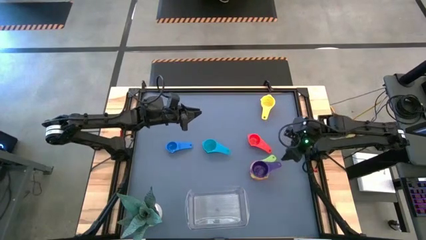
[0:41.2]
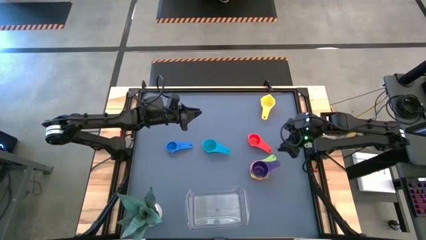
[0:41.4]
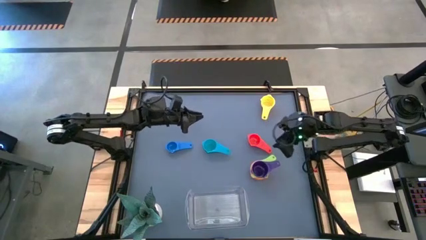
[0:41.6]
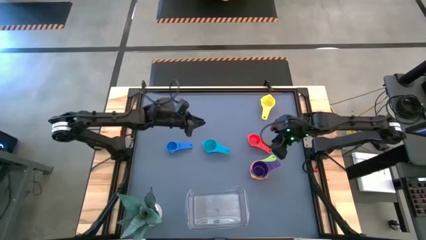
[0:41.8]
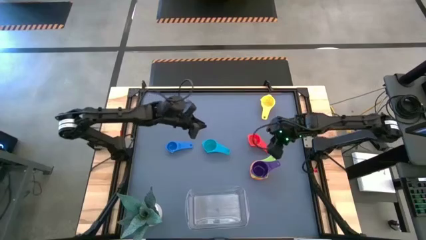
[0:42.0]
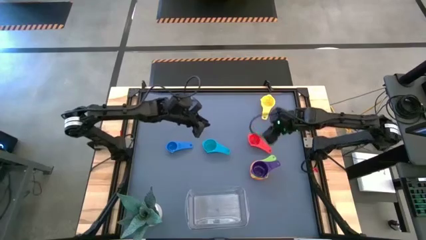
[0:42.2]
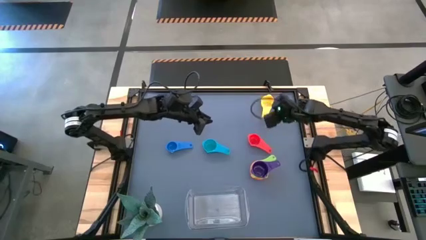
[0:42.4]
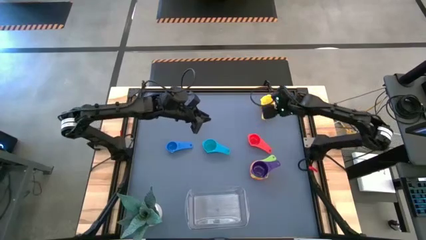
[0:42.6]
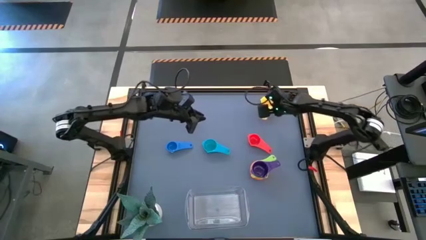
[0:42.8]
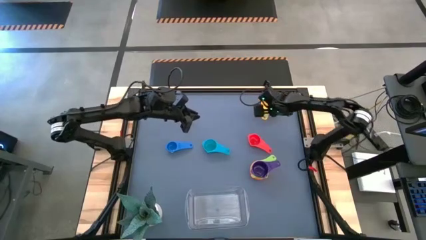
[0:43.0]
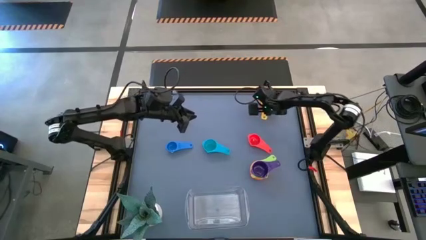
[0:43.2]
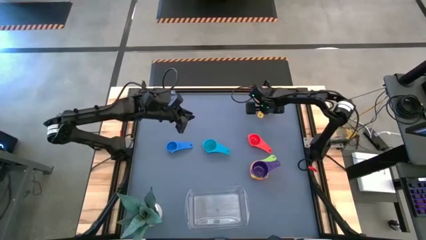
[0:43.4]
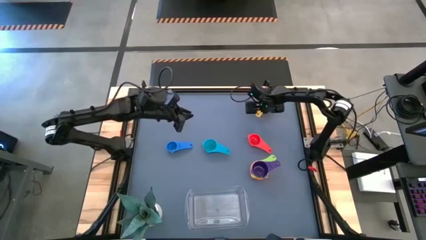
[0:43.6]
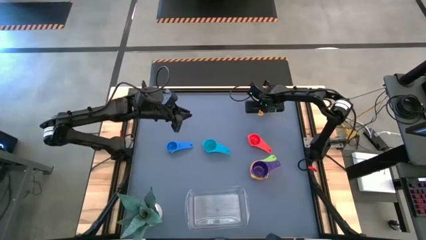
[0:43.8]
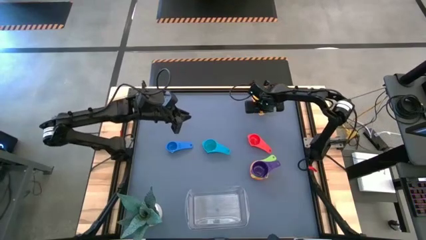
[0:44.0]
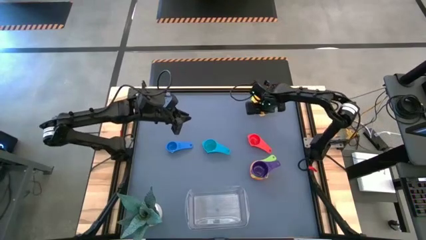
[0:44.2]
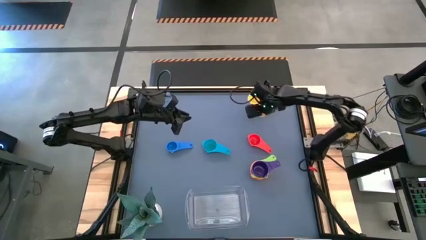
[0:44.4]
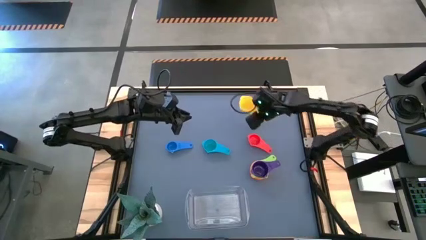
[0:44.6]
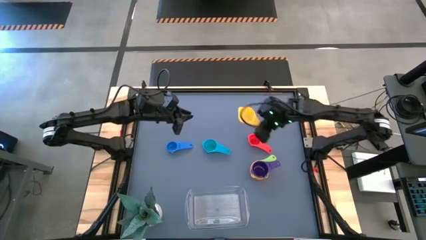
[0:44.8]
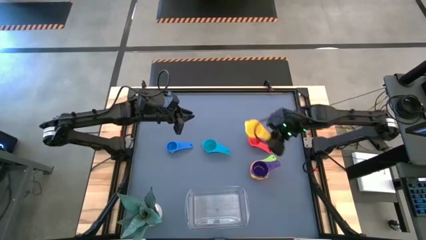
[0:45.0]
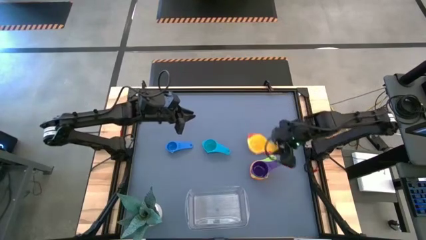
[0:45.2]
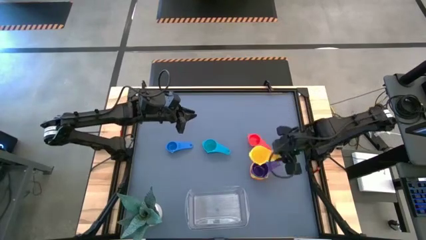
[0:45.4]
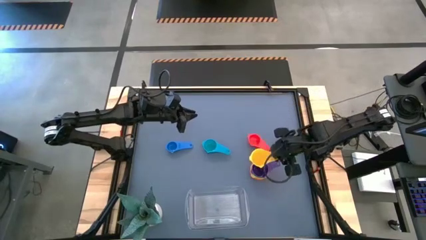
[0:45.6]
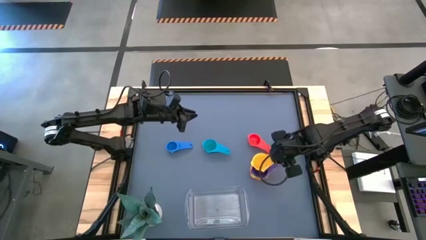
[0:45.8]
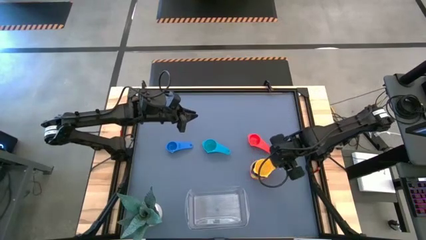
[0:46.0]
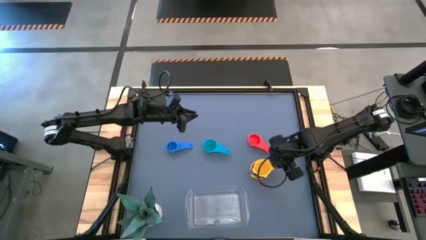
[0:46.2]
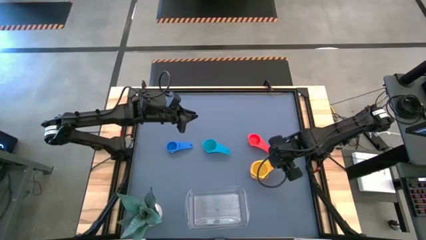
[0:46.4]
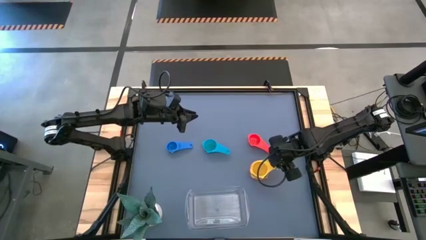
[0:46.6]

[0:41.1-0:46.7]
Task: Nest measuring cups in basket
Stack the yellow measuring cup on top of the purple measuring cup

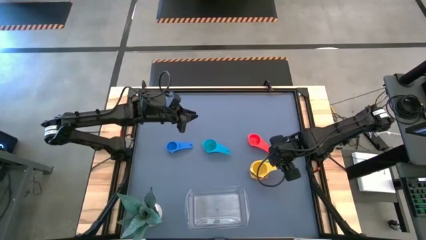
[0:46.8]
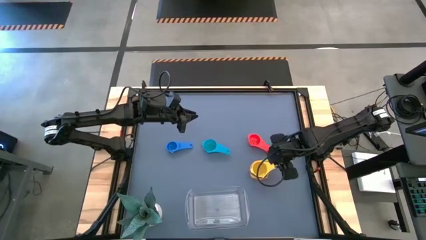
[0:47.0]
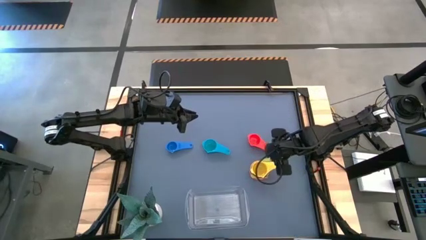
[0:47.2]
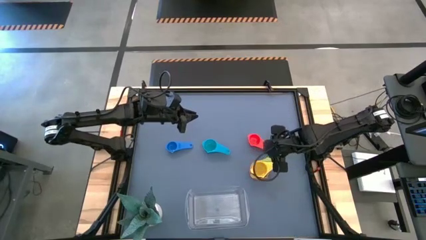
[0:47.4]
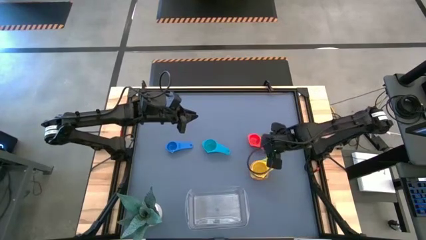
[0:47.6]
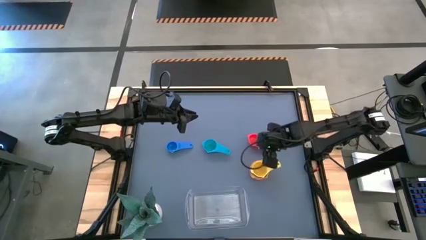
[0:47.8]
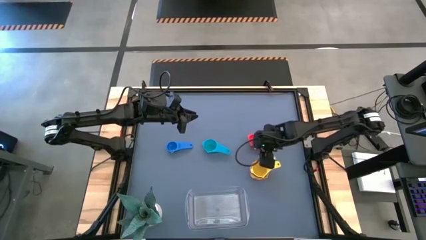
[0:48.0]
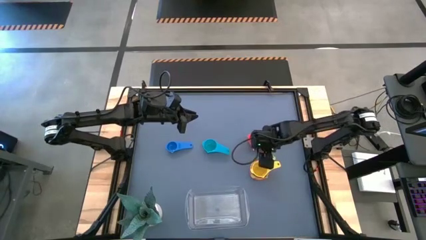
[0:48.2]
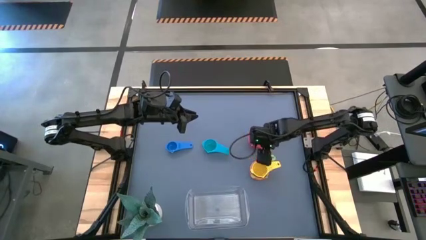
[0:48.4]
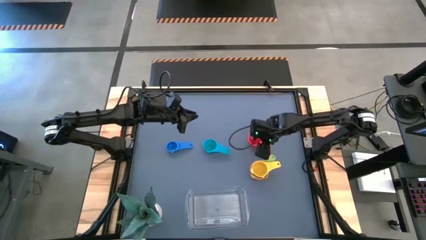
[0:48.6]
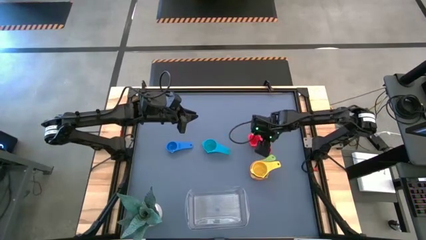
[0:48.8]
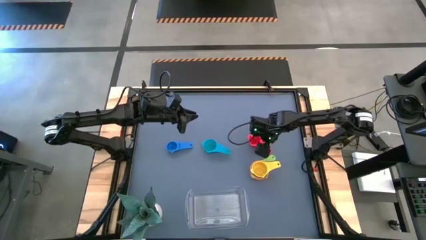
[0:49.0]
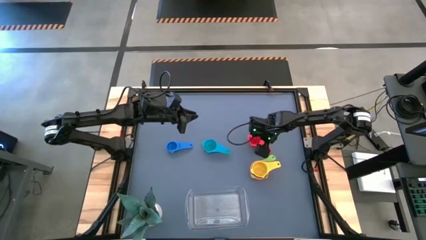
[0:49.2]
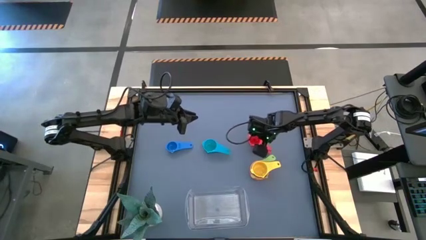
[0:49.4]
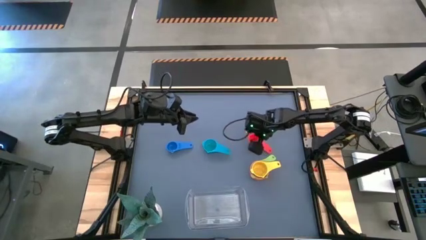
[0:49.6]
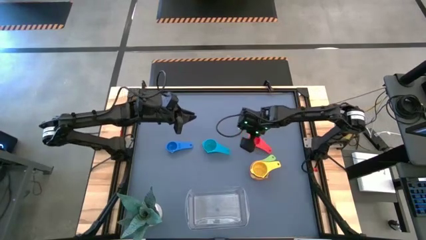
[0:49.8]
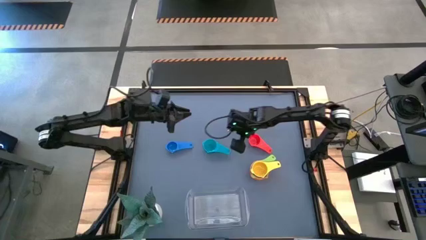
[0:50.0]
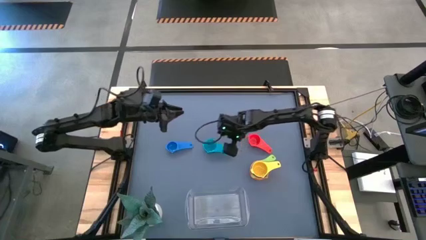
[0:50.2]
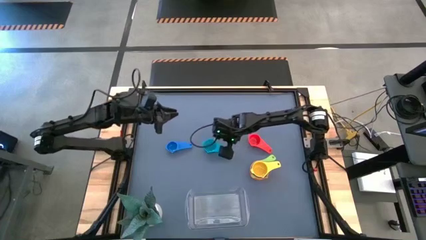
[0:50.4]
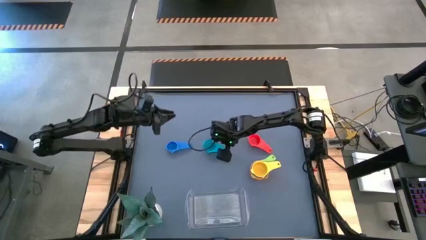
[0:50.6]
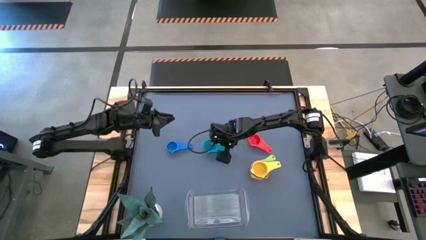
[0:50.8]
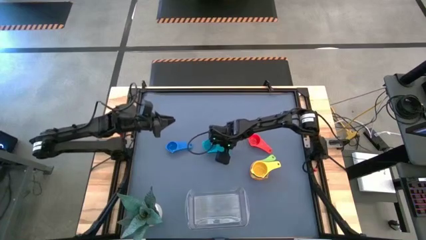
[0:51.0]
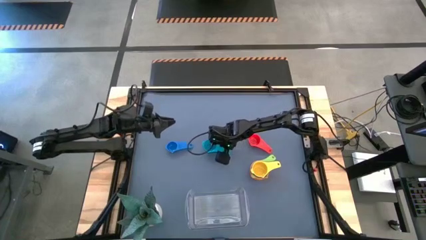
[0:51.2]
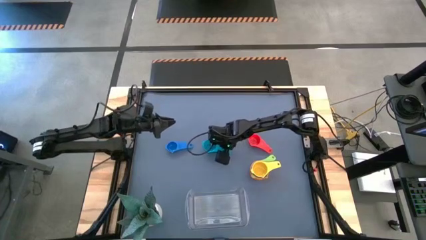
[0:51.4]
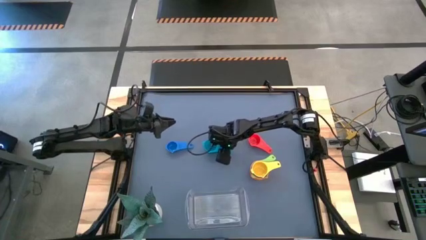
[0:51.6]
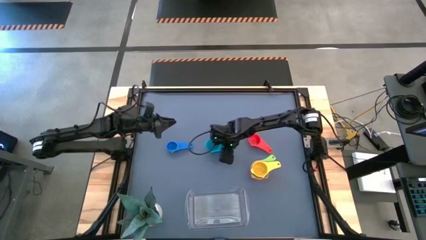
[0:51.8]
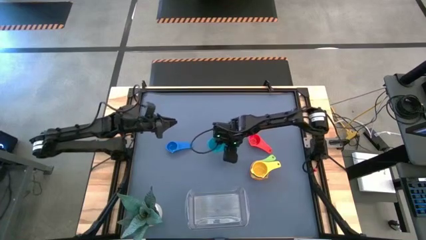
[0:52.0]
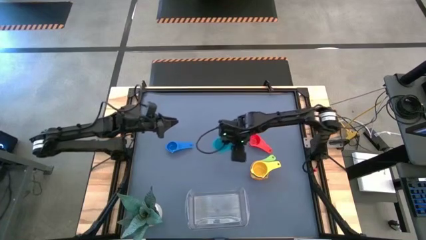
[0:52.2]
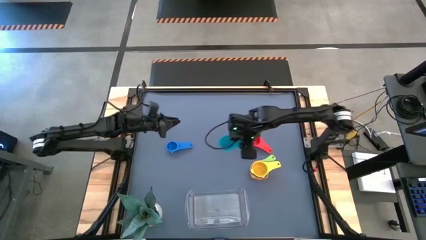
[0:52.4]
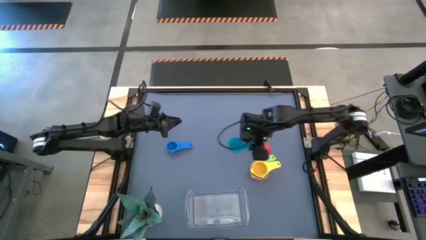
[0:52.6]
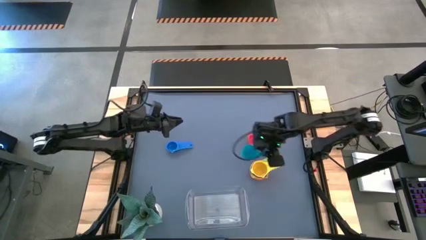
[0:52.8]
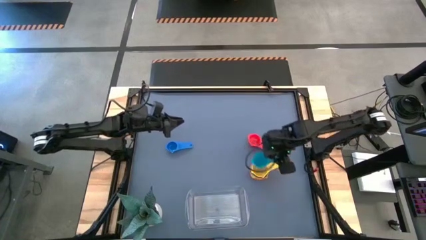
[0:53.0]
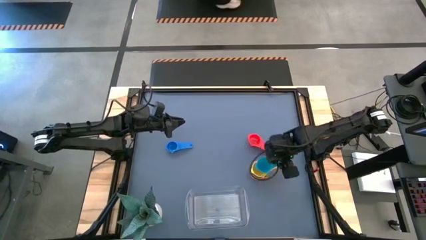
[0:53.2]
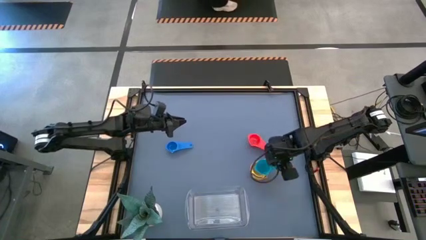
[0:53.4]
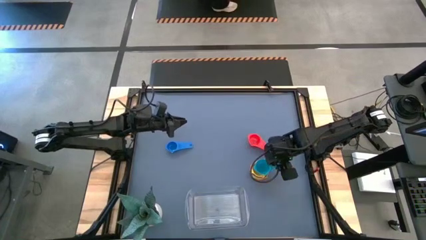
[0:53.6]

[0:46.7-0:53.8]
Stack the light blue measuring cup on top of the yellow measuring cup

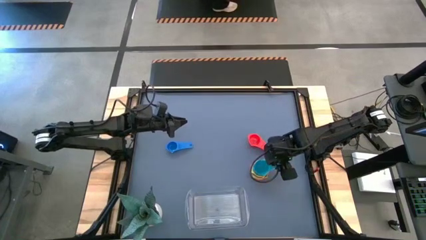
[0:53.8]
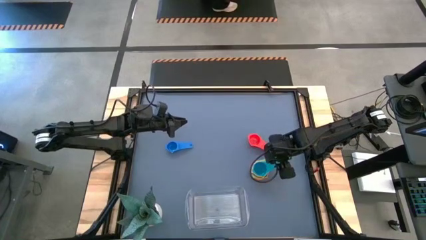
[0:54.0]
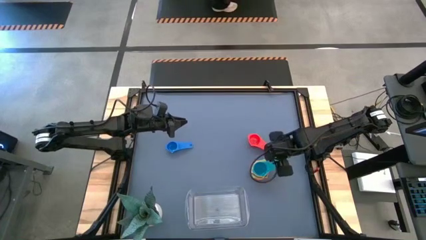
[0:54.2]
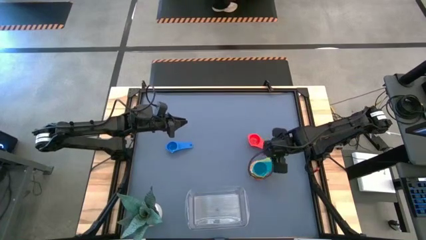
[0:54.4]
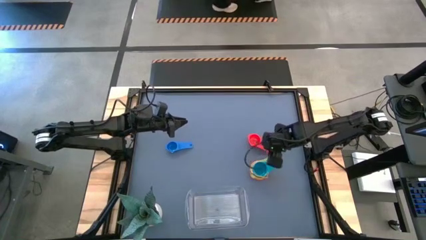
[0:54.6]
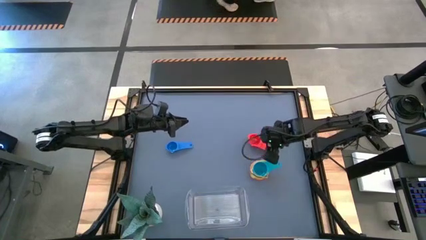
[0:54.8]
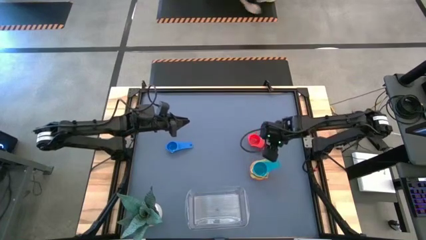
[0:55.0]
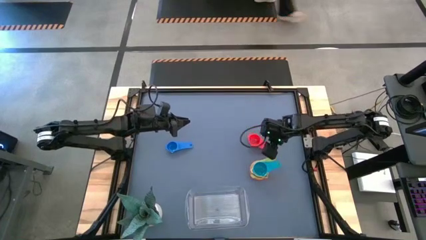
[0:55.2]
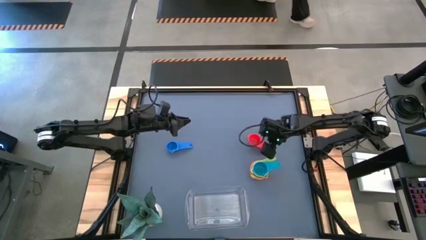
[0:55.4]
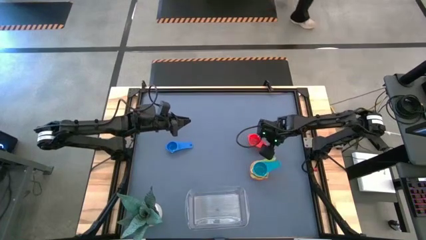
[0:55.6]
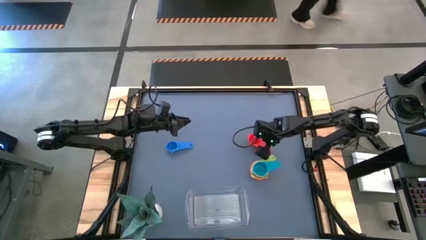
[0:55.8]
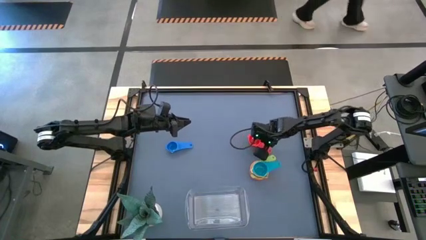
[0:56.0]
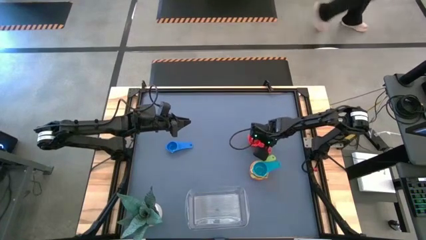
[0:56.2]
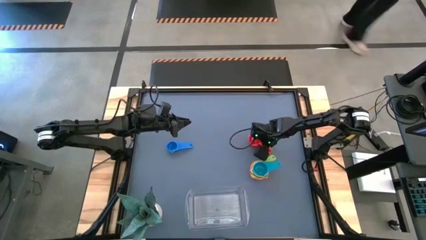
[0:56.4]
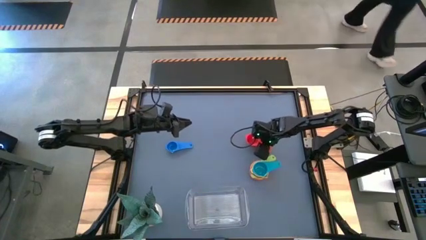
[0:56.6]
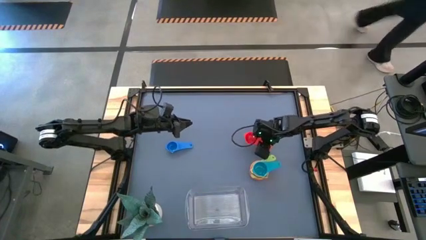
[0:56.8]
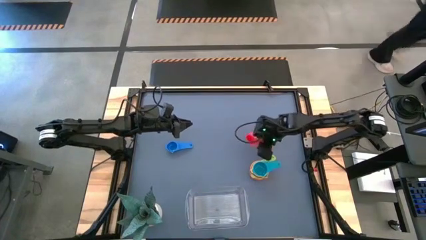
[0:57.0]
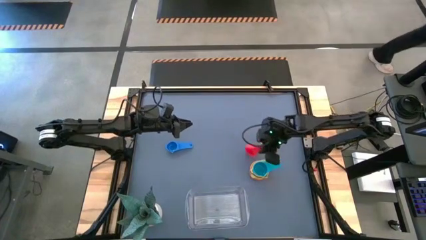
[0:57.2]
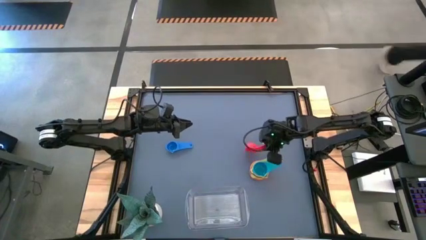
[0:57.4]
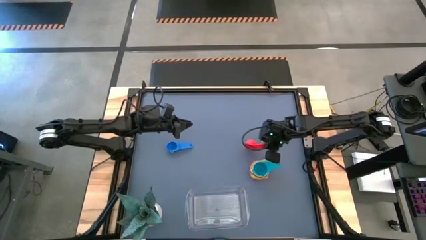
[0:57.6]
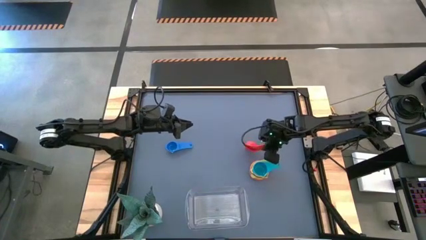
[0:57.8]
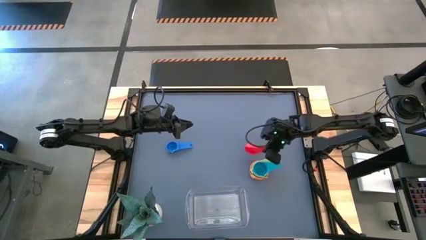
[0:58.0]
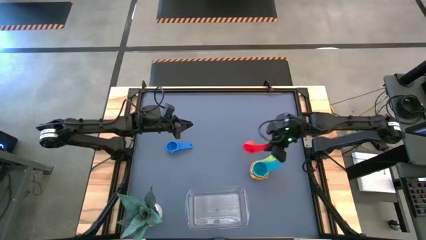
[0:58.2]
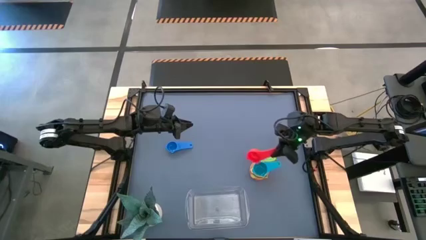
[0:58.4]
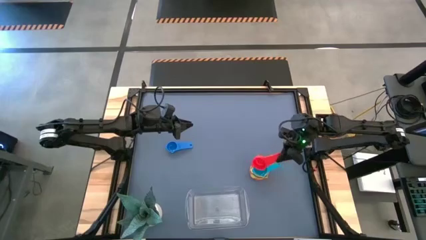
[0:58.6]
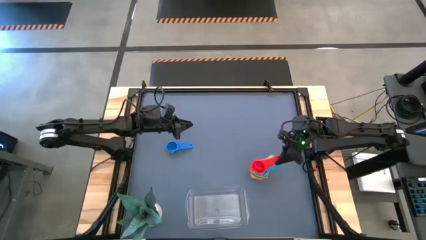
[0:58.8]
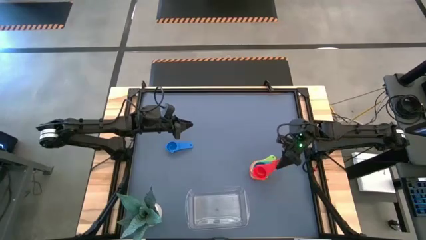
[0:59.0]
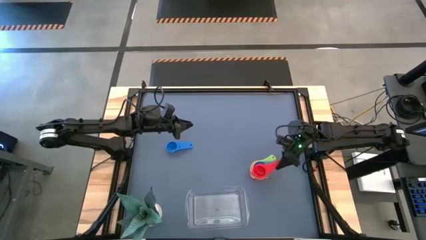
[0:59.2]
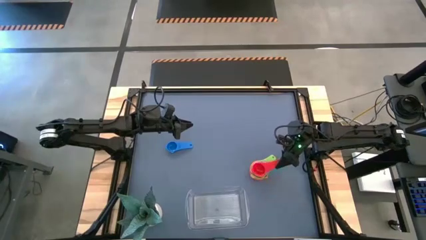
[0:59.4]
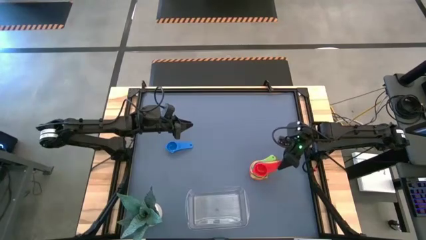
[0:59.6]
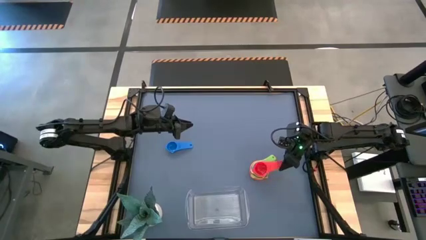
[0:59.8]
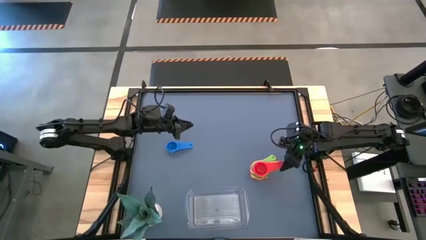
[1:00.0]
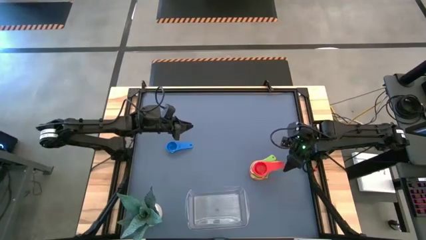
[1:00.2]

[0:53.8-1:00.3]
Stack the red measuring cup on top of the light blue measuring cup
